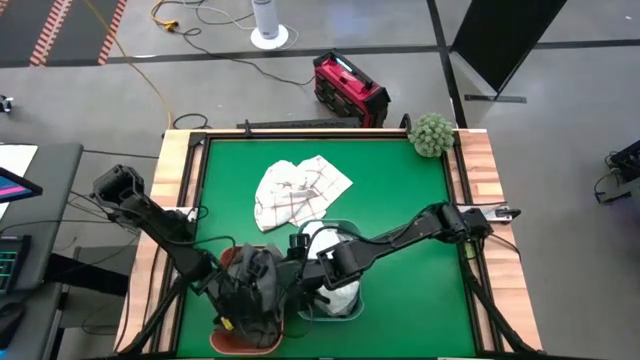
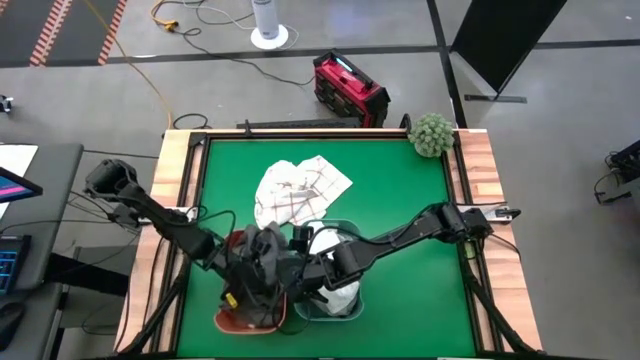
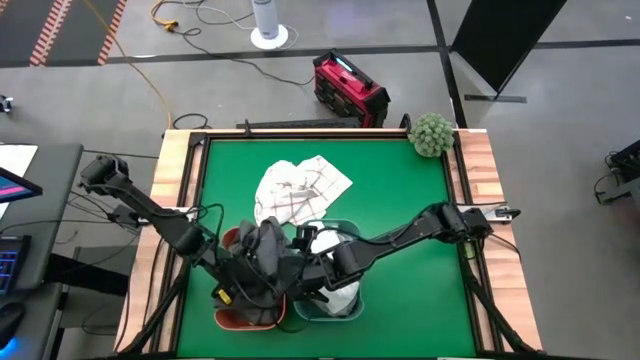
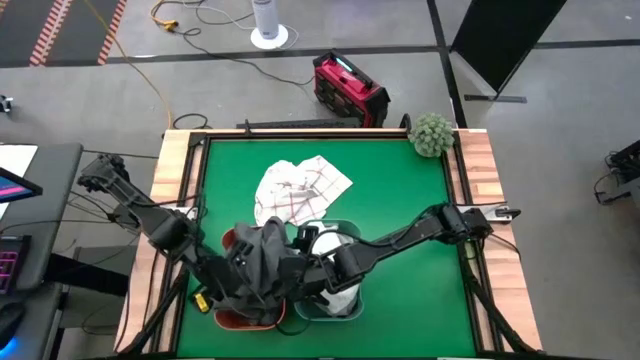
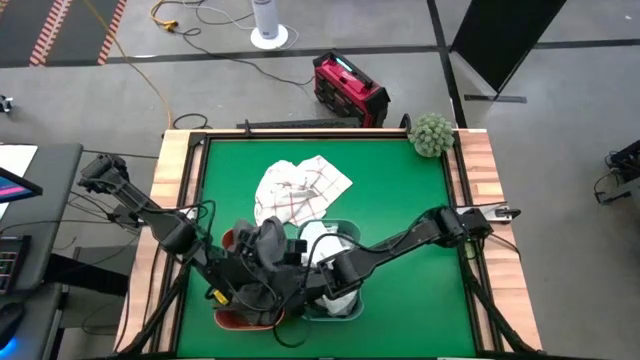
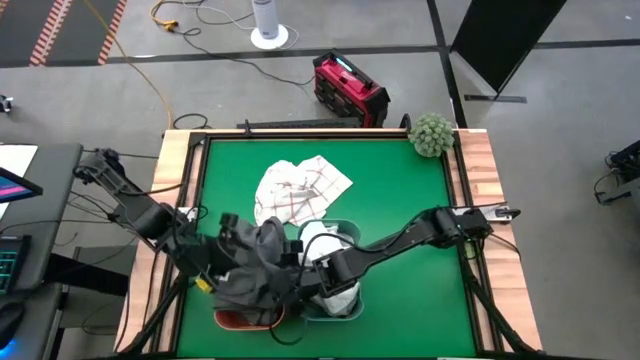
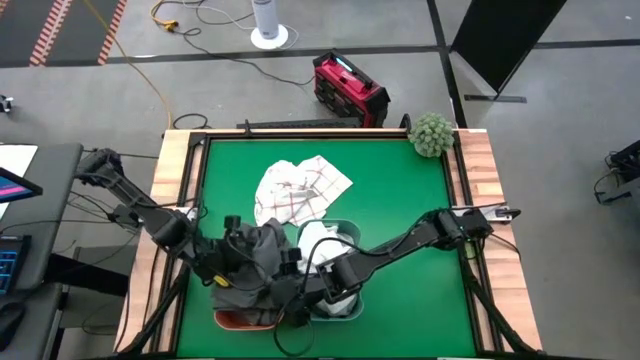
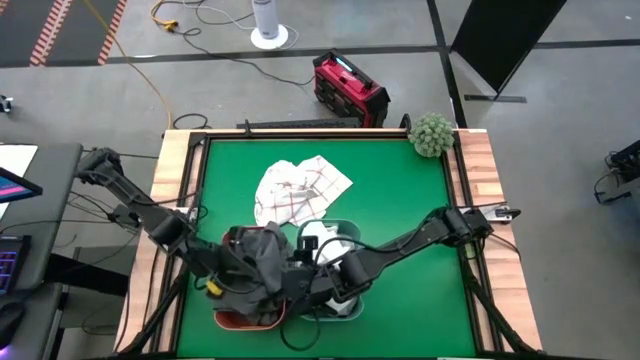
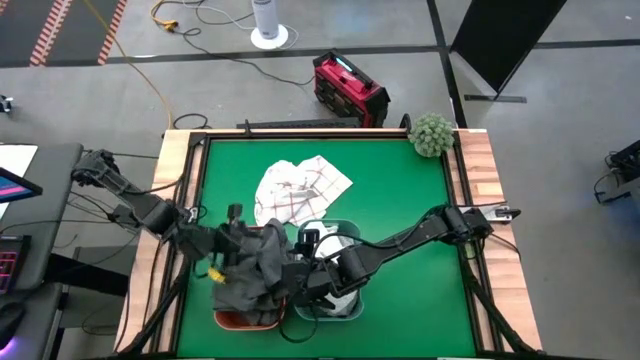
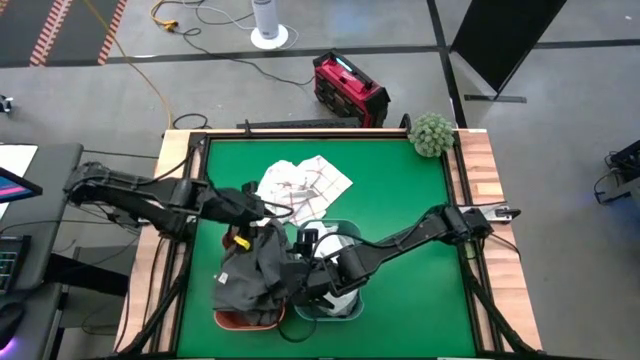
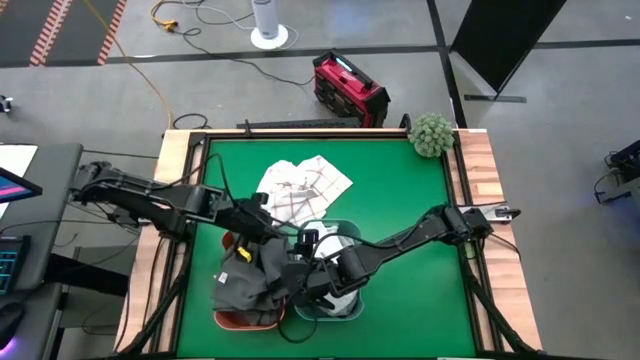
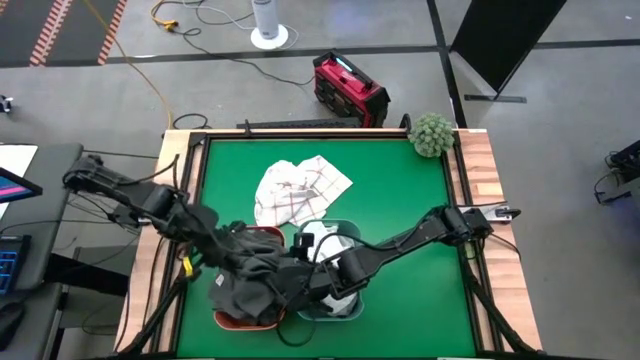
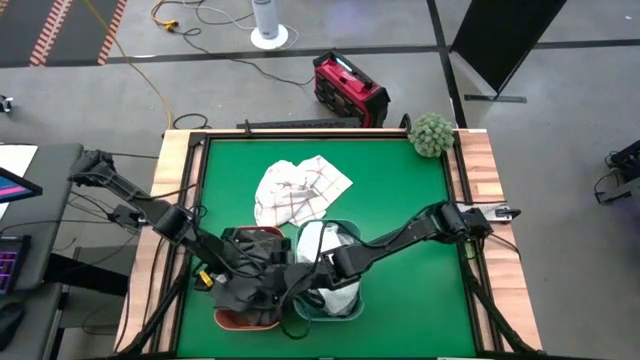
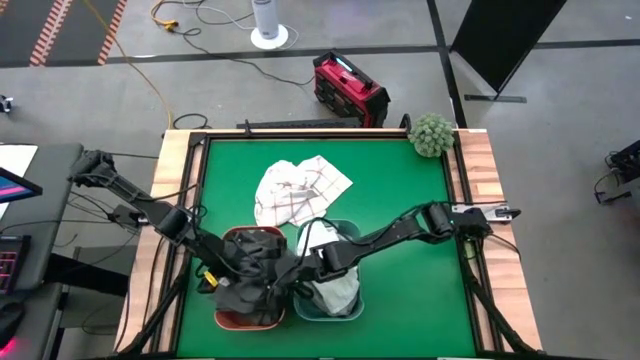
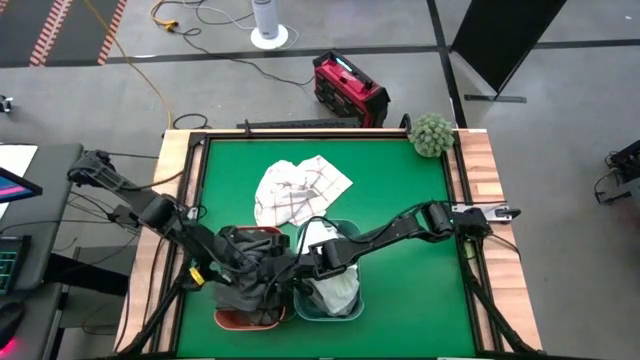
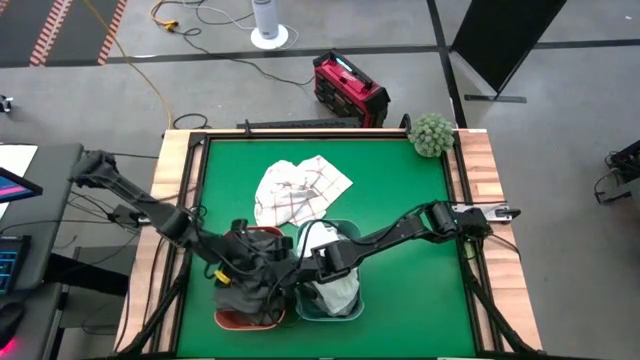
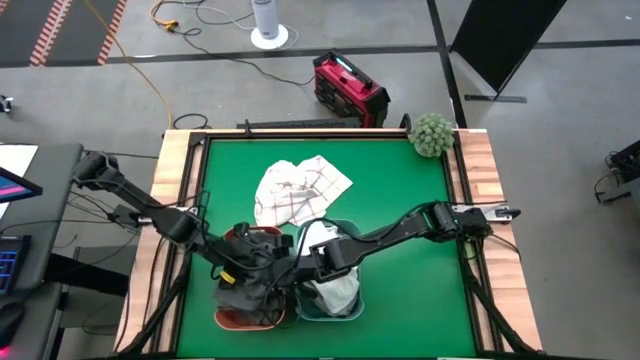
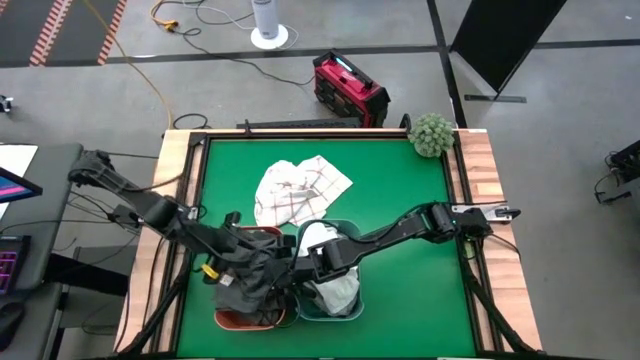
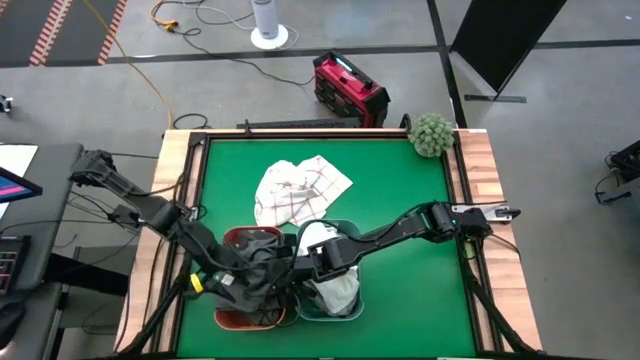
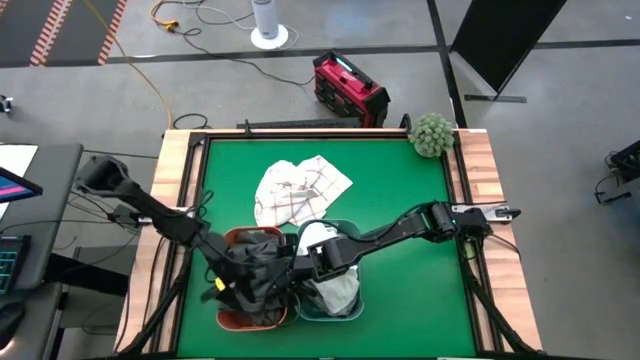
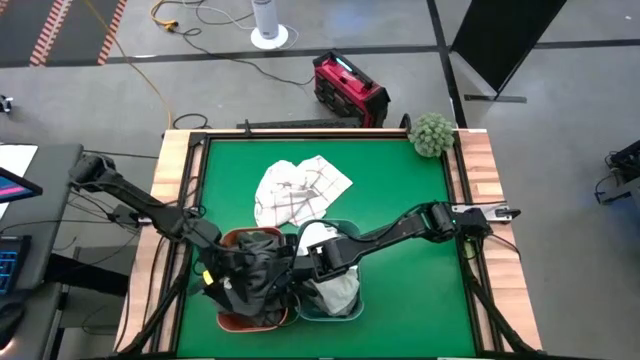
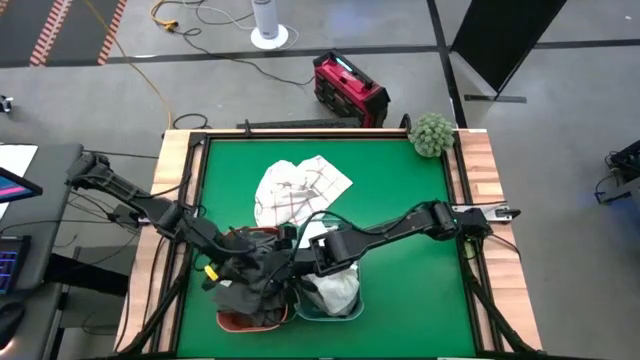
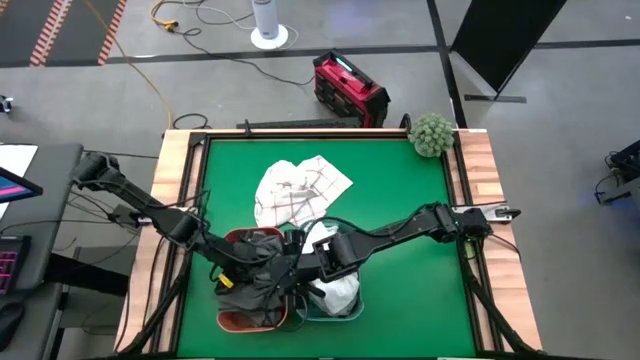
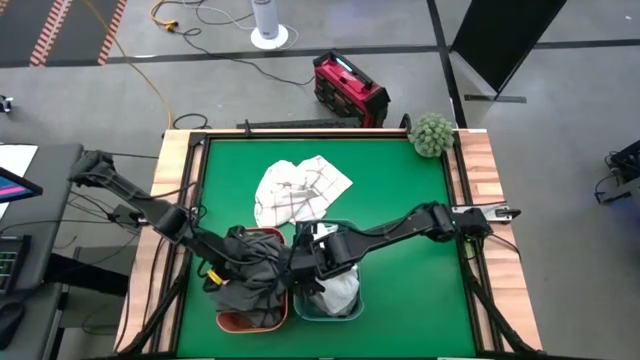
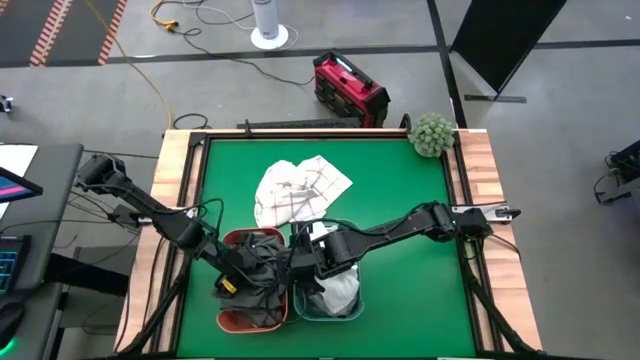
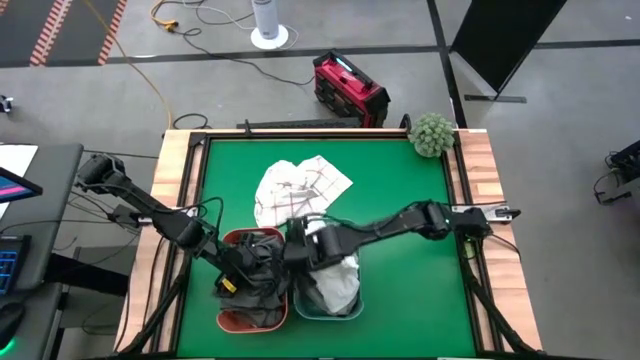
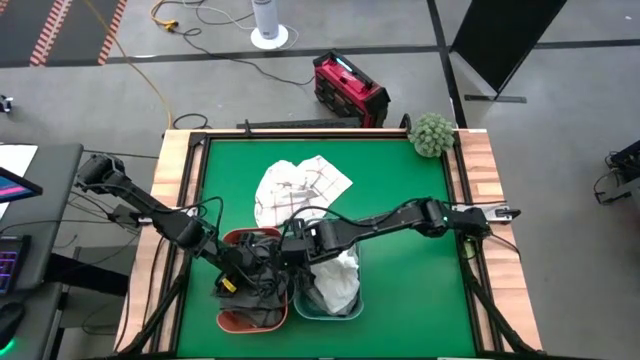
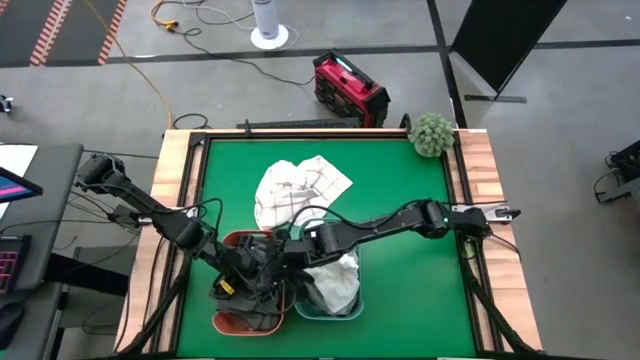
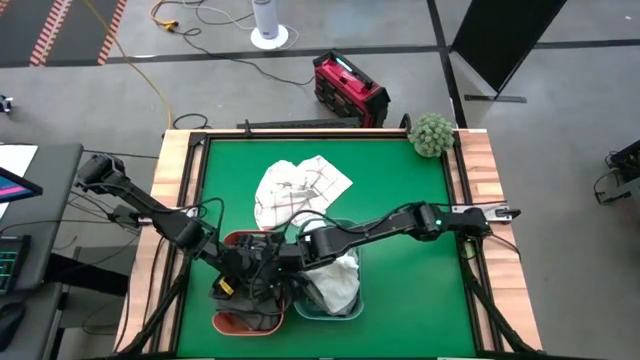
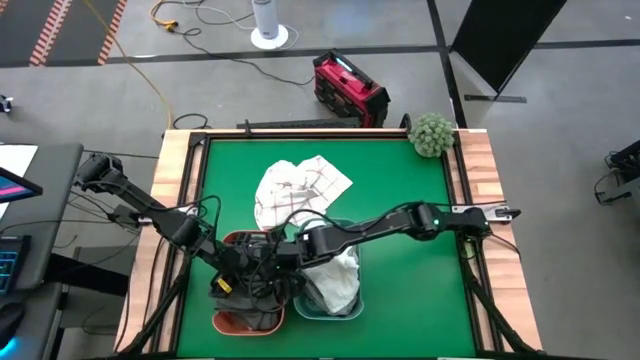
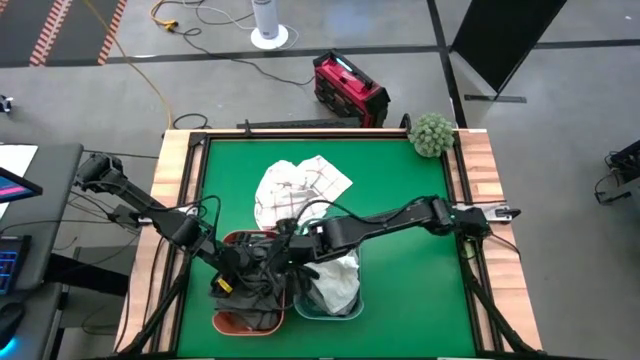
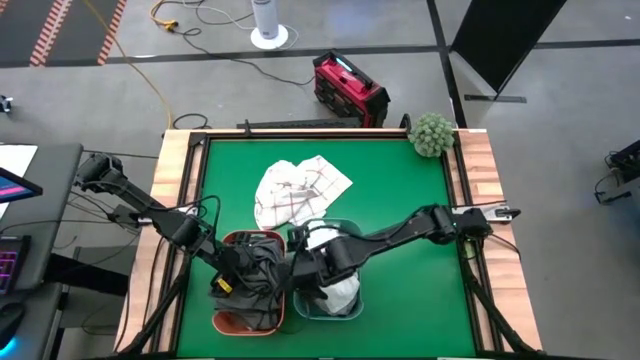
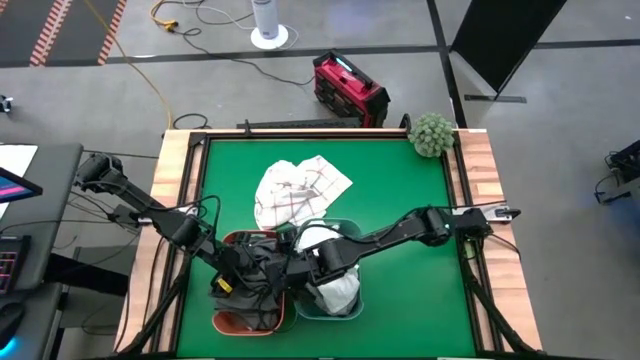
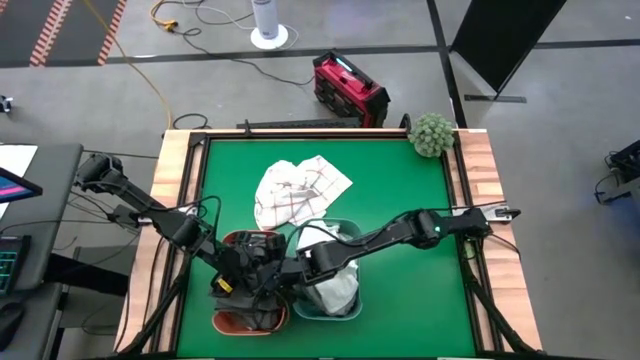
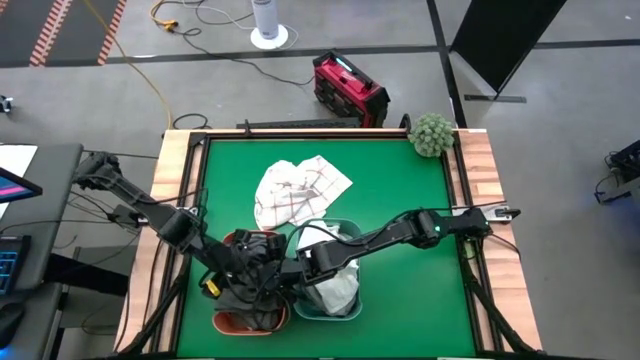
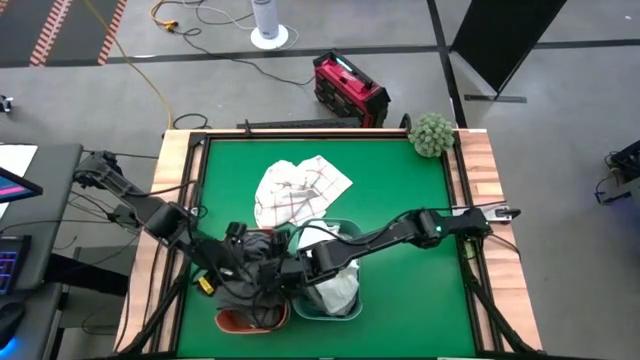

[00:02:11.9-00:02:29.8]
Task: Sort towels by color in basket
Put the black towel into the orange bin

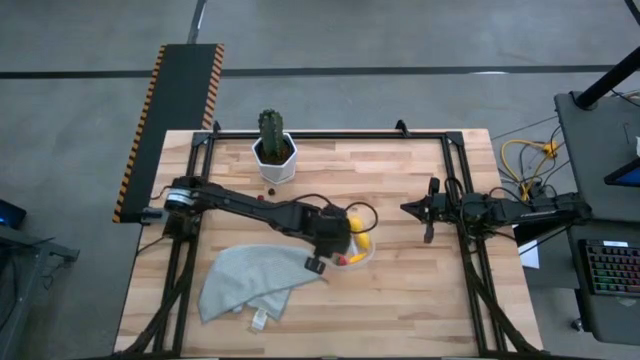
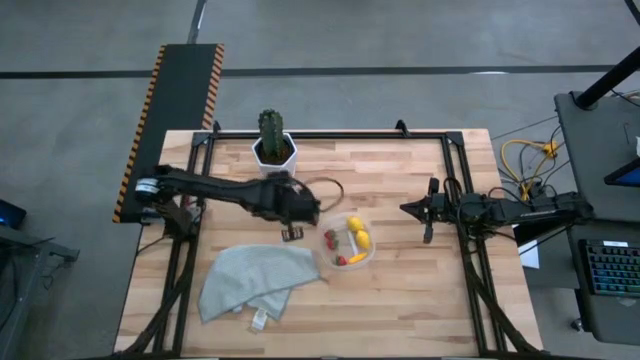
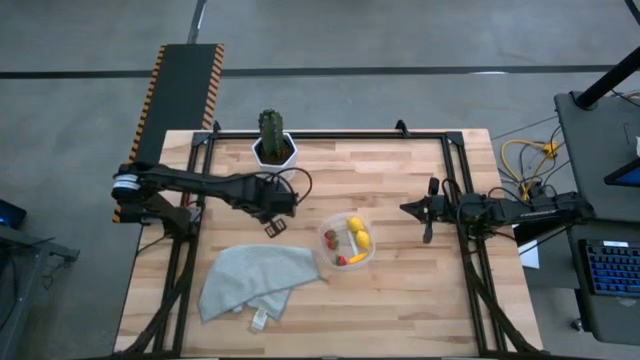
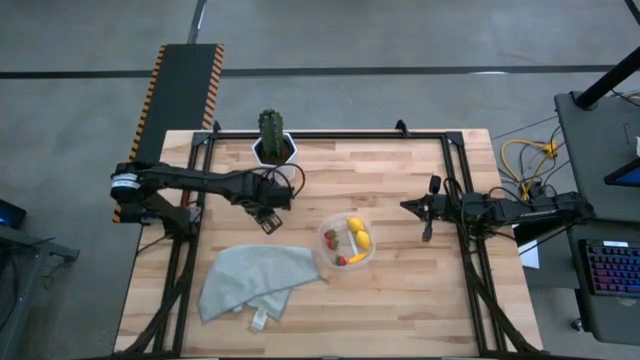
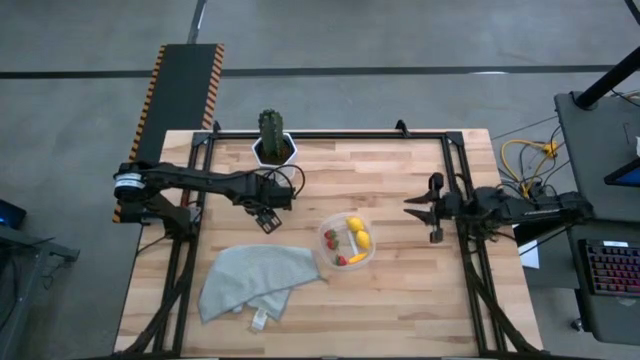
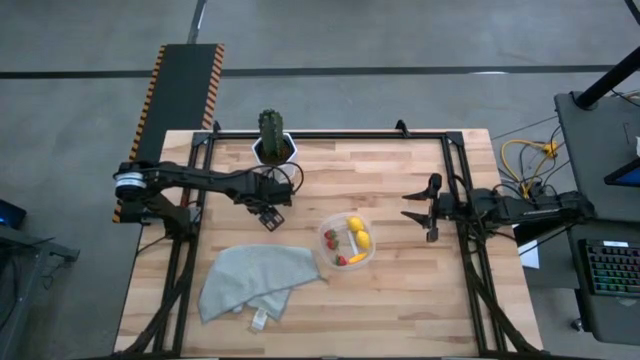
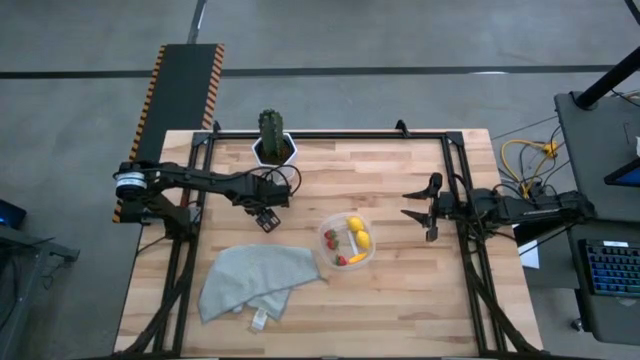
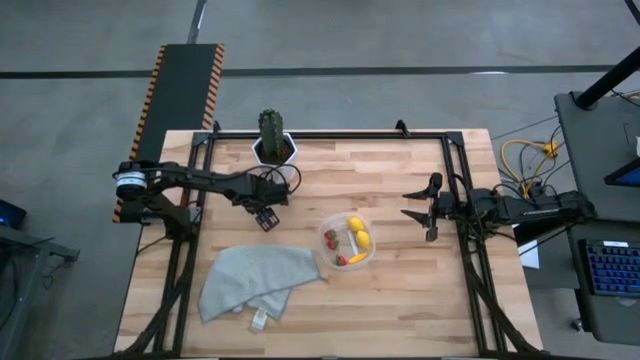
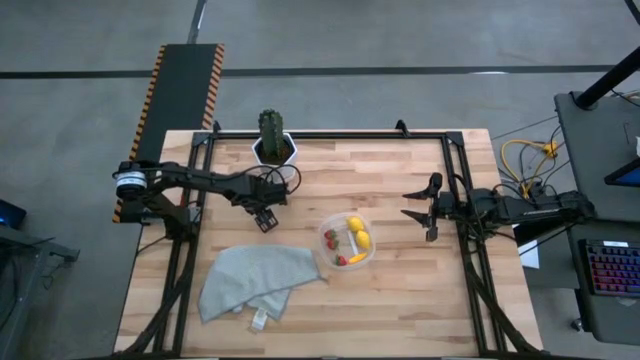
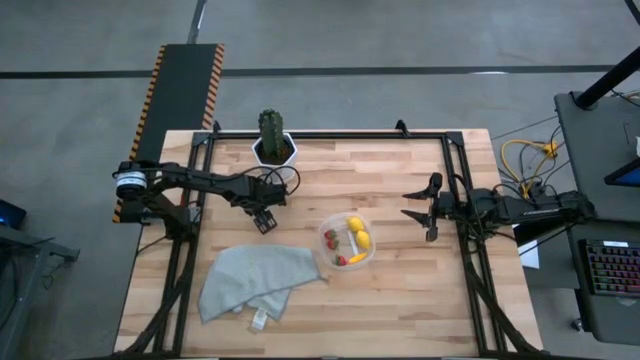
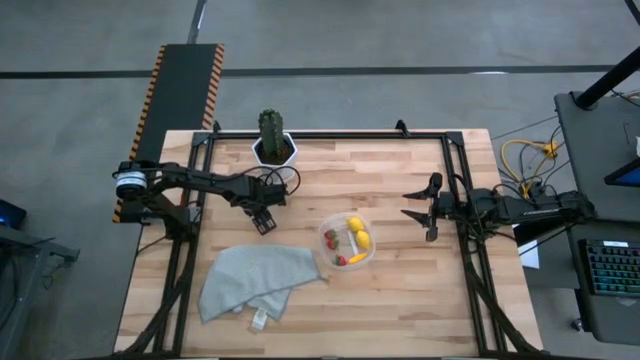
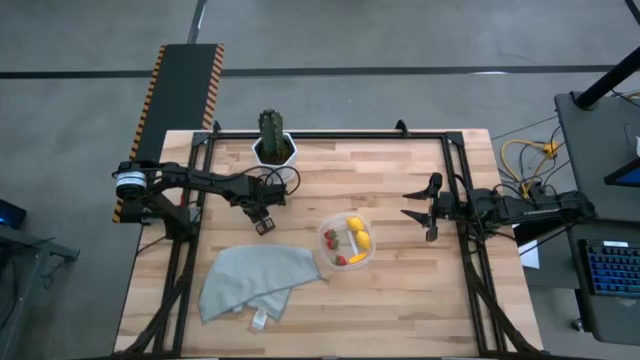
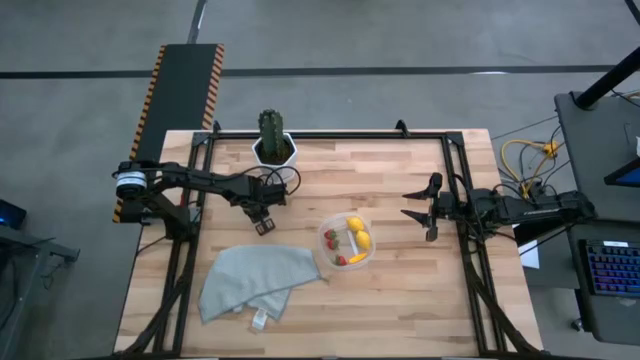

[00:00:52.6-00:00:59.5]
Task: Pick and placing Produce into tupperware
Put the blackberry into the transparent container
